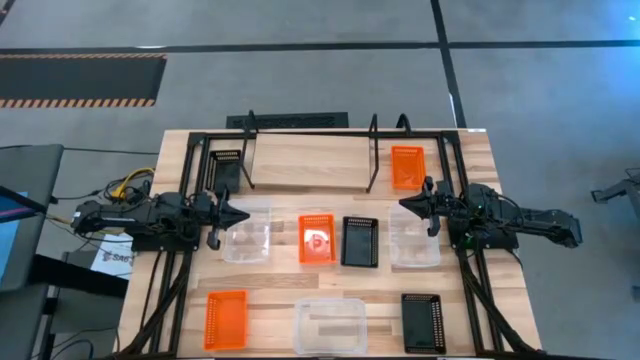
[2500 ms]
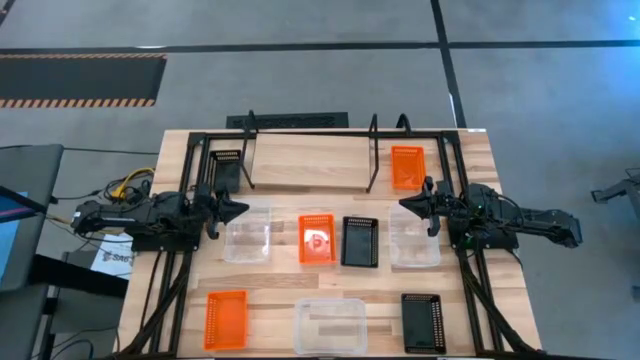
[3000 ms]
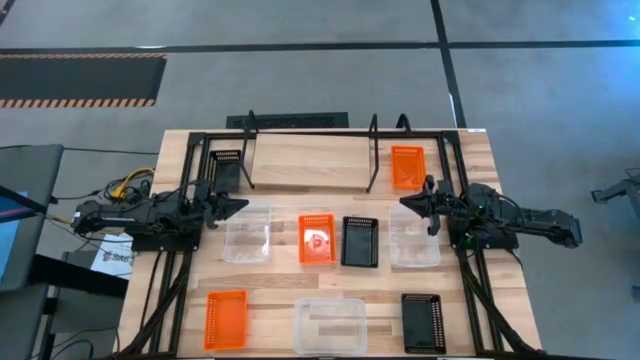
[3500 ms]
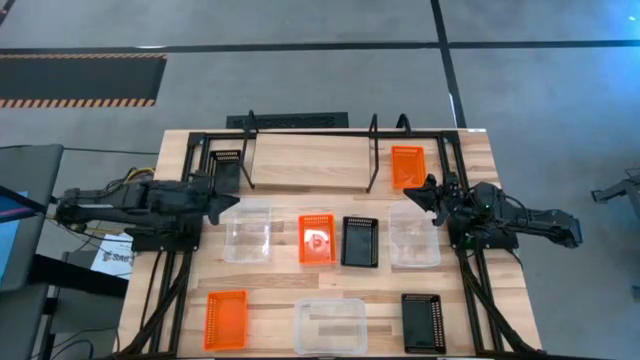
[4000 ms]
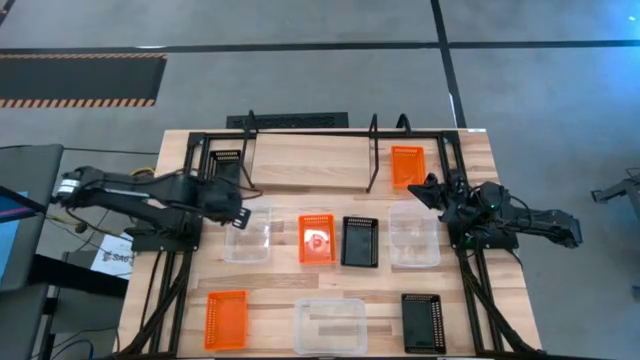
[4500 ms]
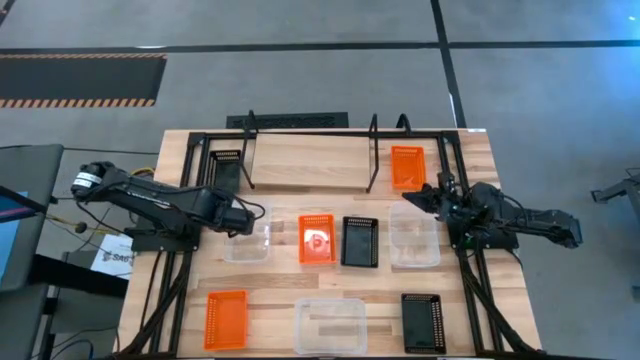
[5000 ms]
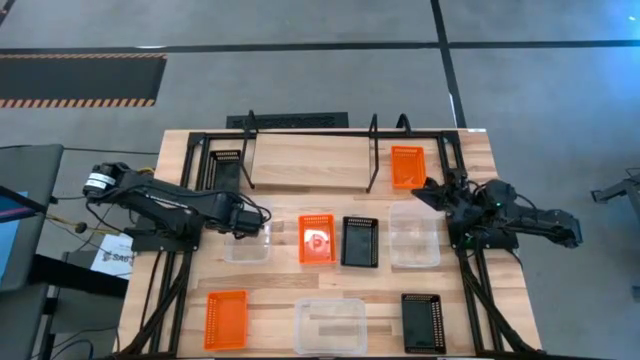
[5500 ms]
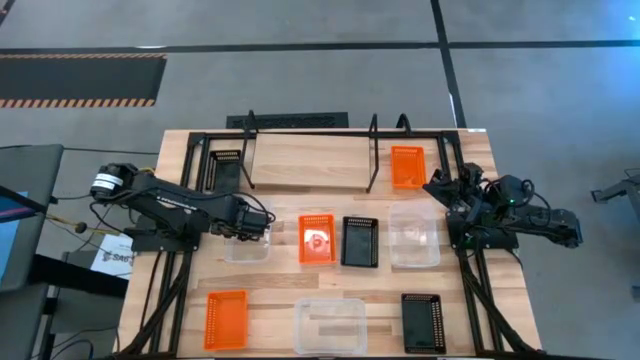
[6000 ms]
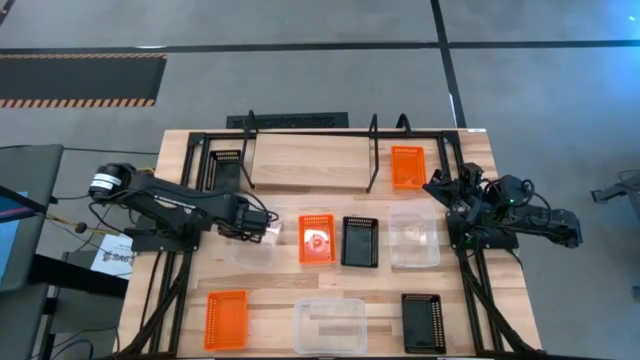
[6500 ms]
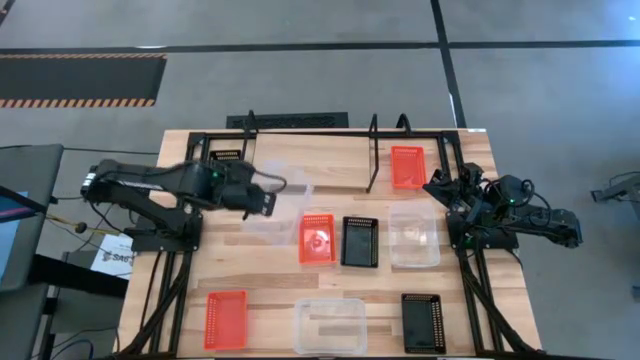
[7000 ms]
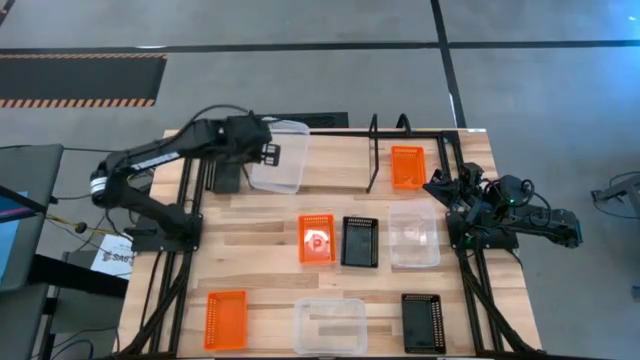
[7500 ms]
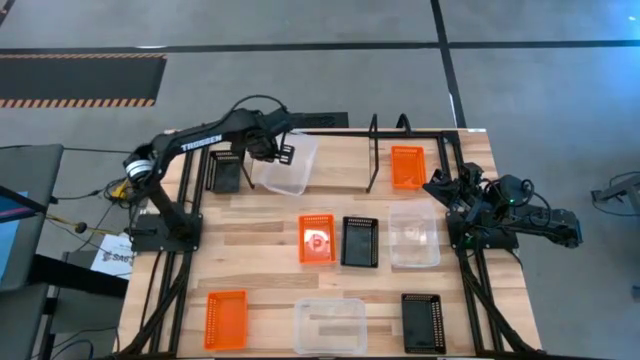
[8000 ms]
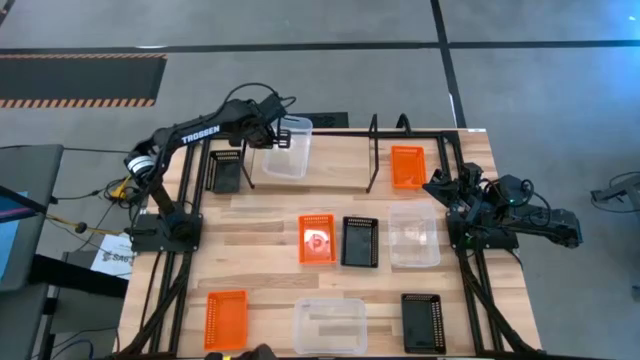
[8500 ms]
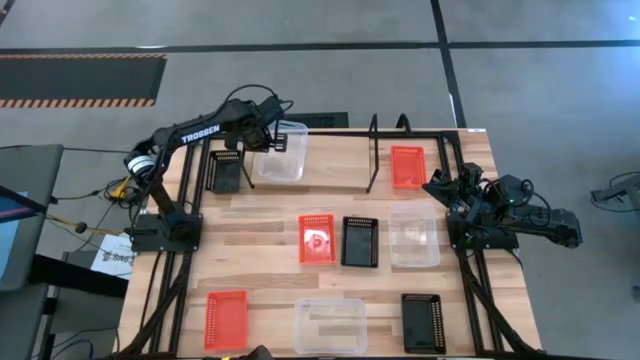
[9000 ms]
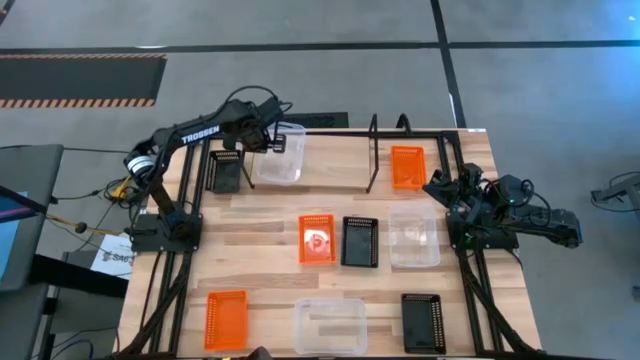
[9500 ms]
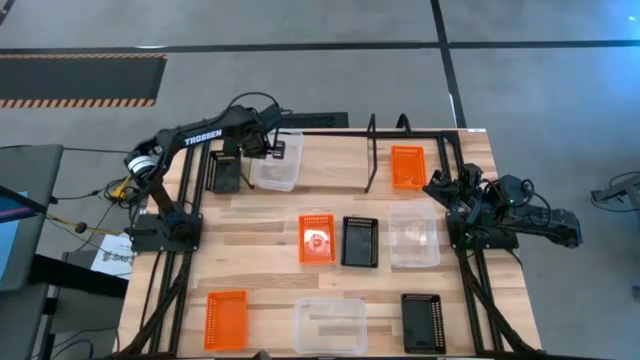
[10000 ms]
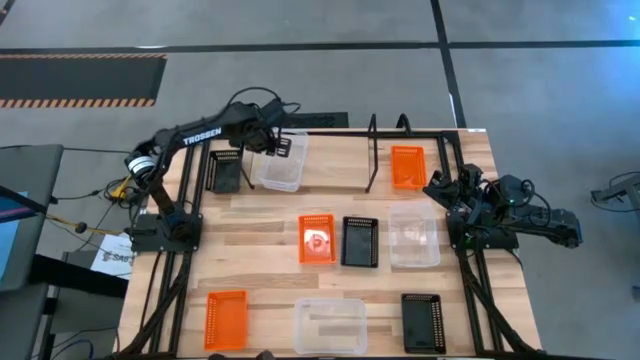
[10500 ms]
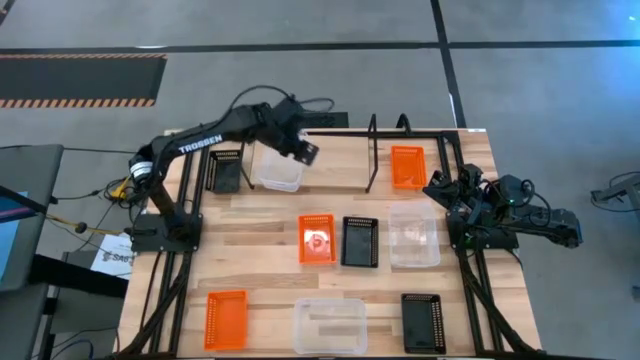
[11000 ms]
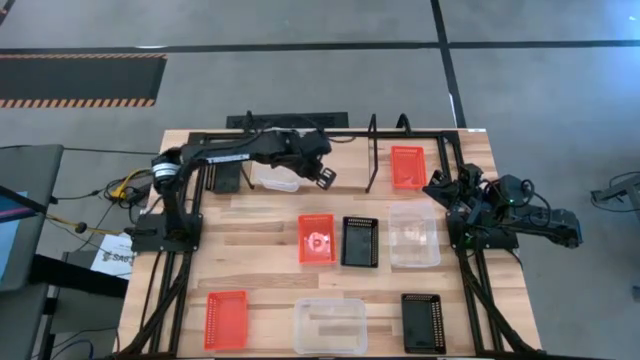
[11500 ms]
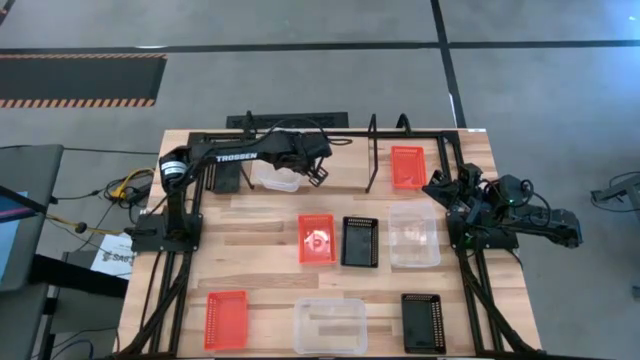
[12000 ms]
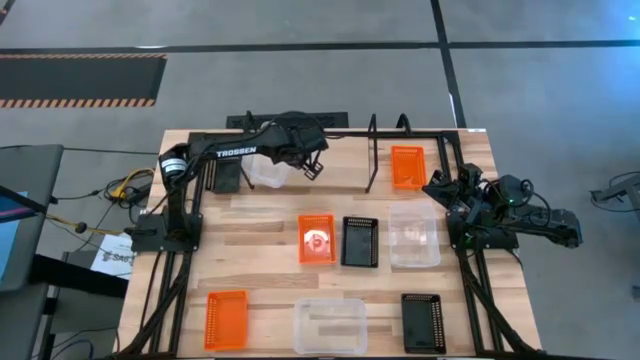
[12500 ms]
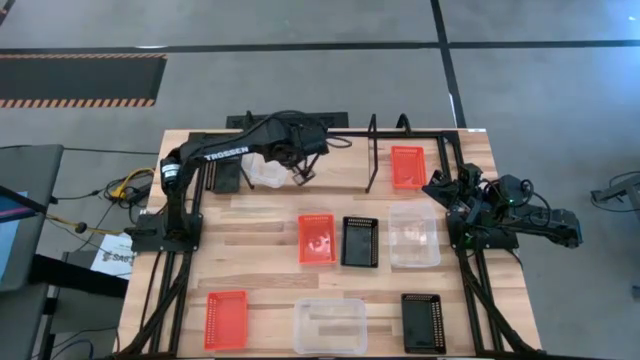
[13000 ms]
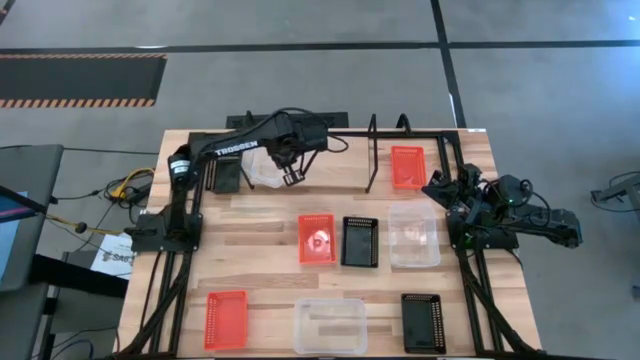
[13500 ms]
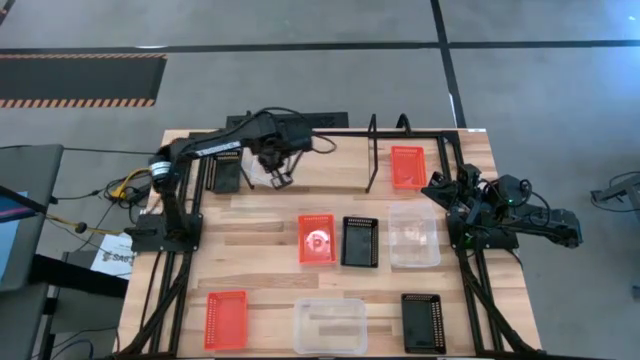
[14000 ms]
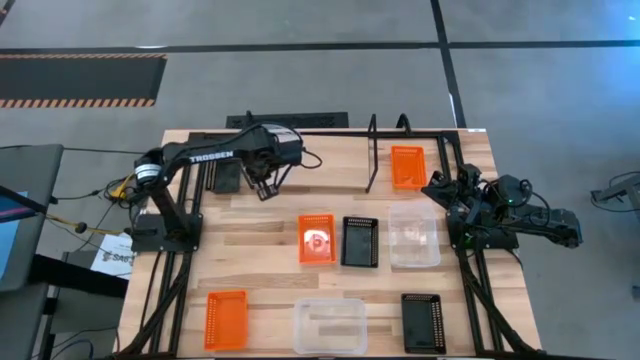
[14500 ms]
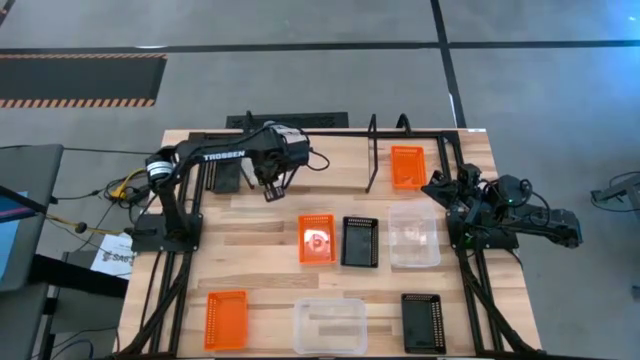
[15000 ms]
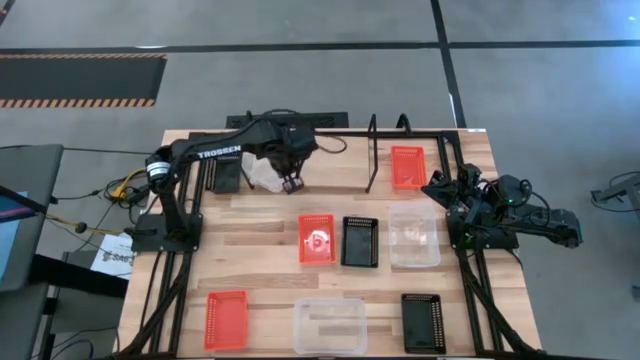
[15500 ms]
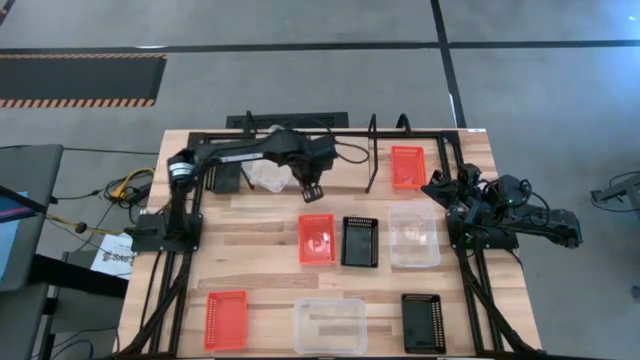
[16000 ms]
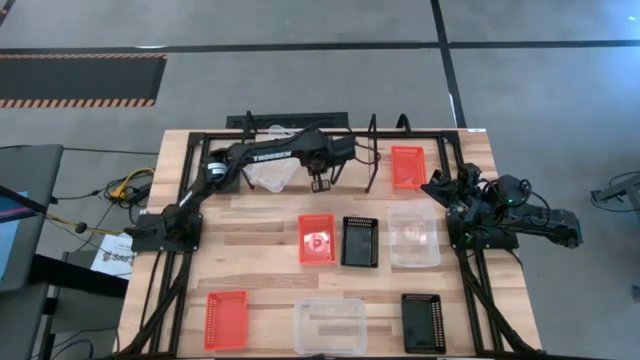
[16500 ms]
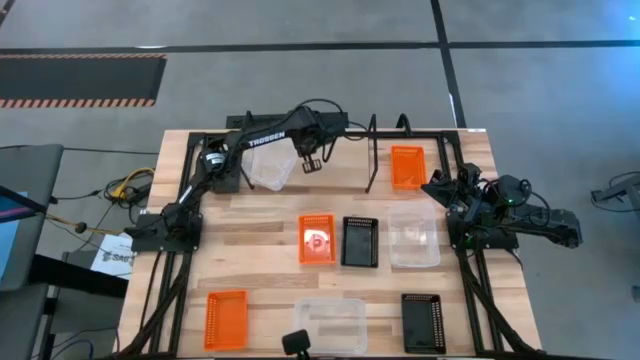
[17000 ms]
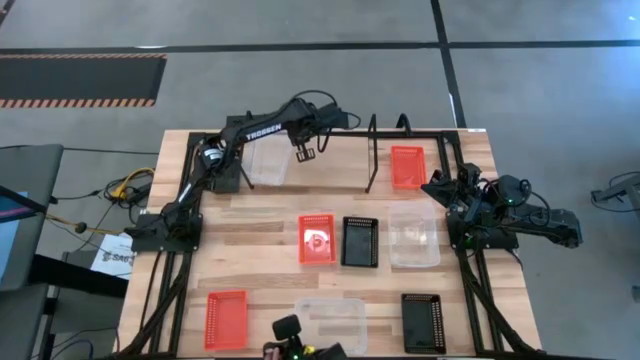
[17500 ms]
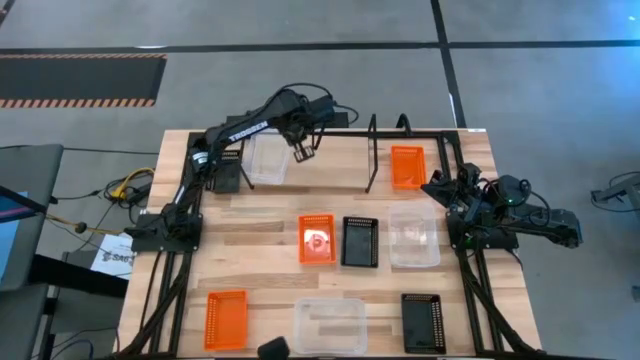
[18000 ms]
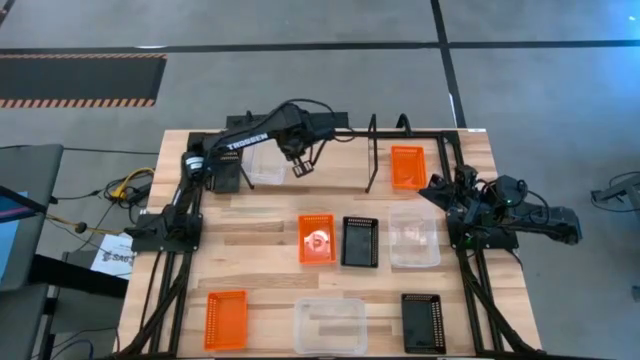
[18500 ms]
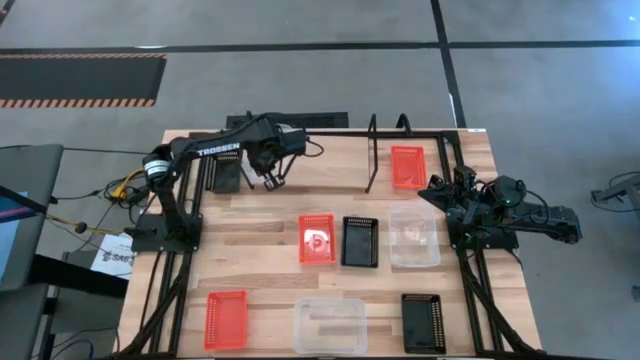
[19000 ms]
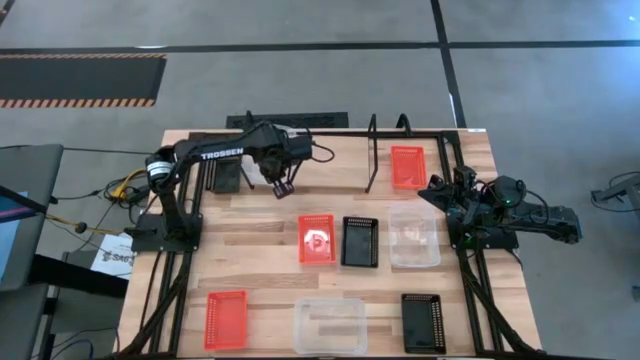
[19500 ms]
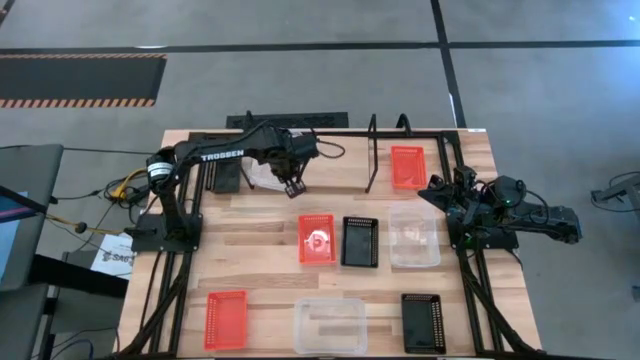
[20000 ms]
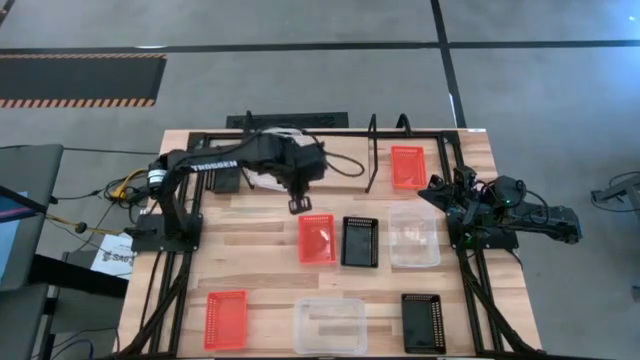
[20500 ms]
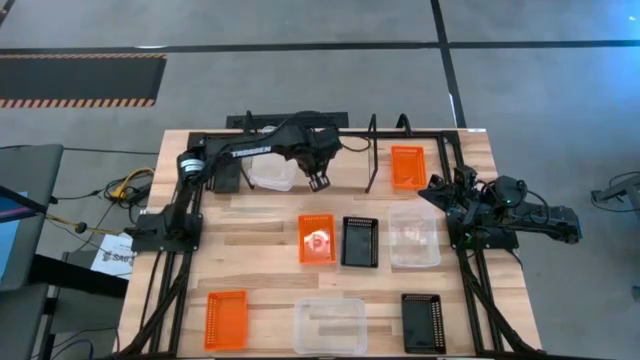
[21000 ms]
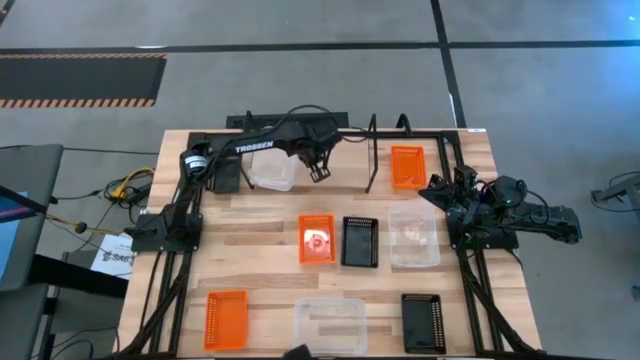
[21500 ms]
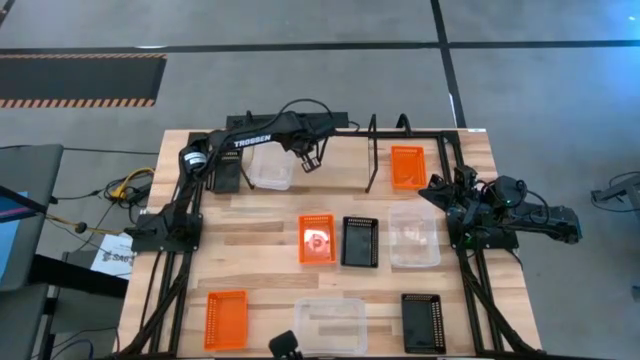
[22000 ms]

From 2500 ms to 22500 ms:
Task: Stack baskets on shelf by color
Put the top left transparent bin on the shelf
